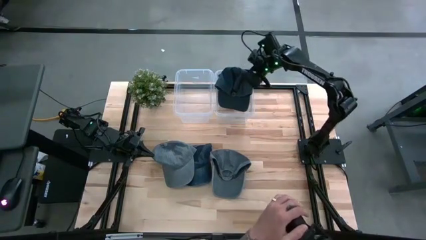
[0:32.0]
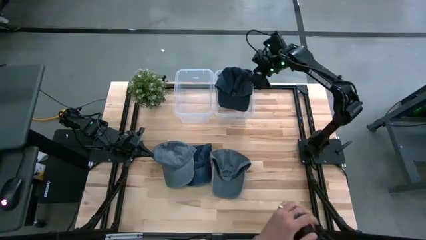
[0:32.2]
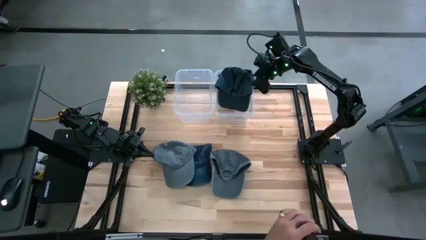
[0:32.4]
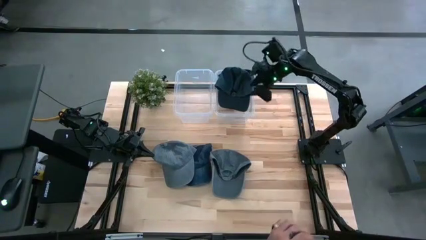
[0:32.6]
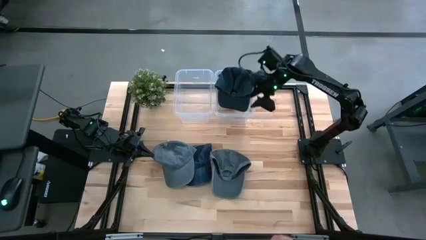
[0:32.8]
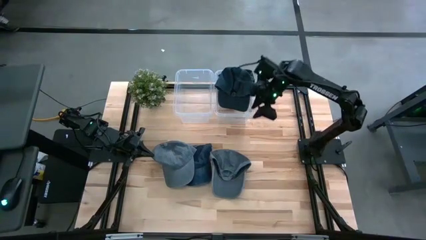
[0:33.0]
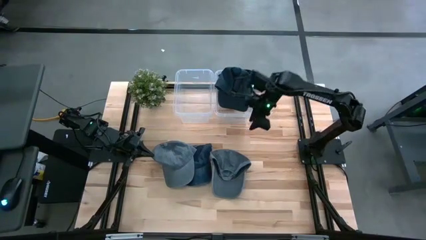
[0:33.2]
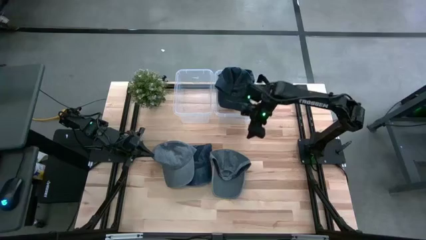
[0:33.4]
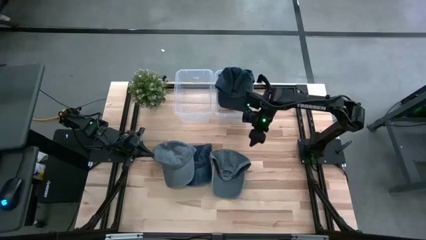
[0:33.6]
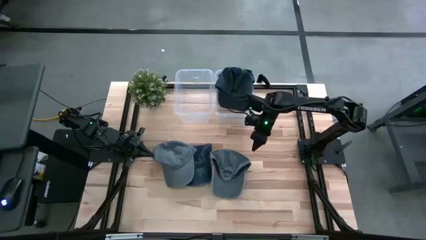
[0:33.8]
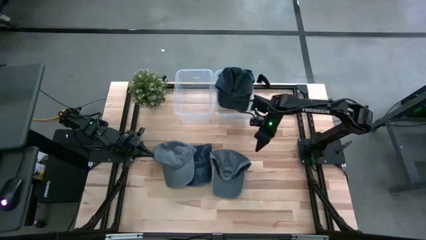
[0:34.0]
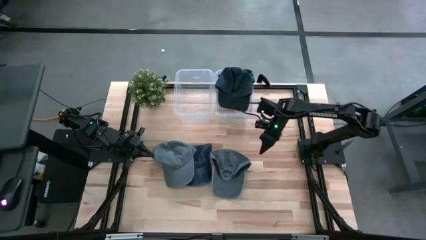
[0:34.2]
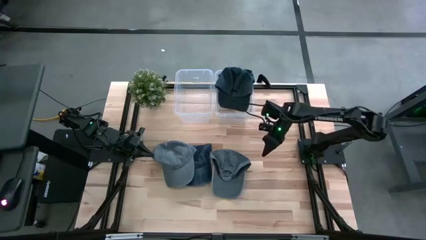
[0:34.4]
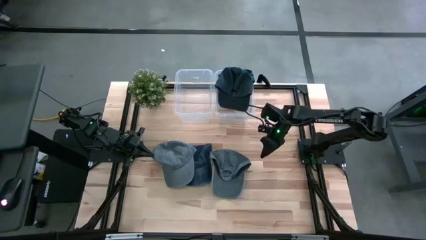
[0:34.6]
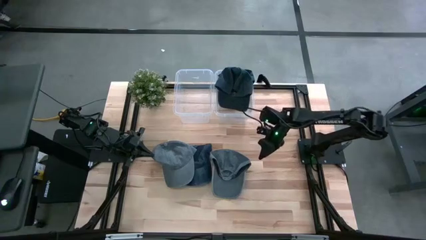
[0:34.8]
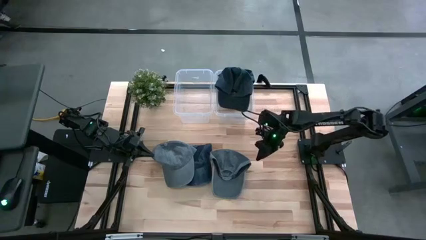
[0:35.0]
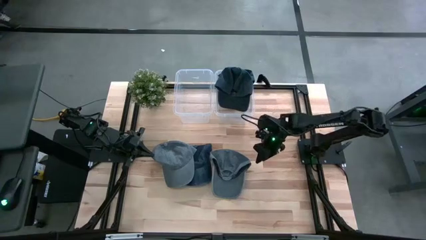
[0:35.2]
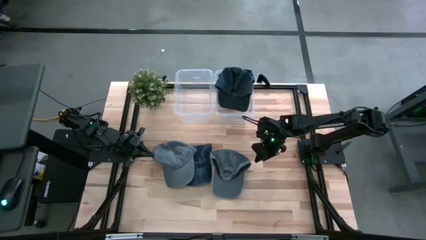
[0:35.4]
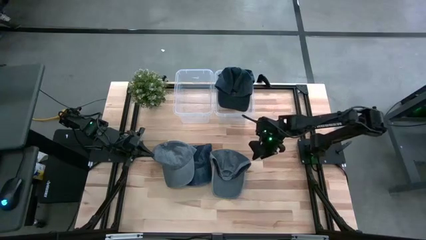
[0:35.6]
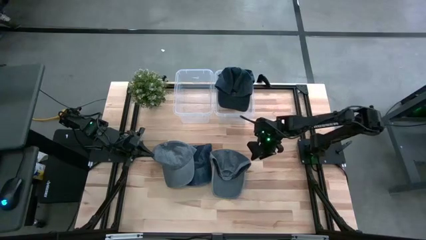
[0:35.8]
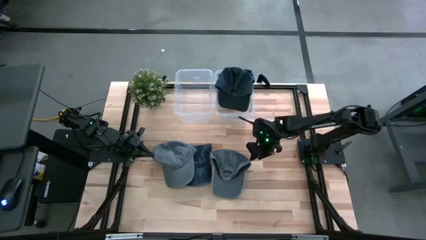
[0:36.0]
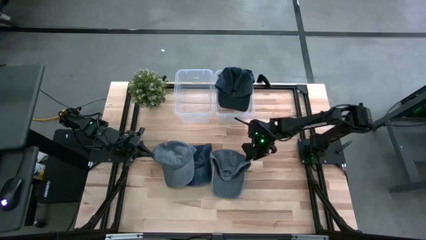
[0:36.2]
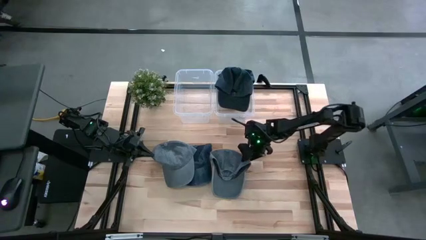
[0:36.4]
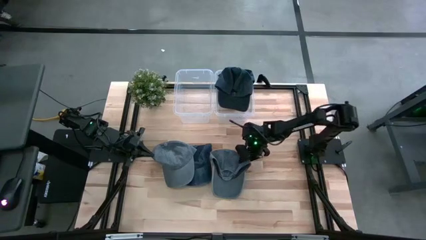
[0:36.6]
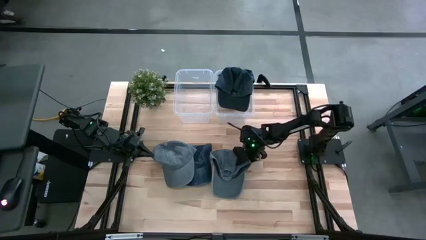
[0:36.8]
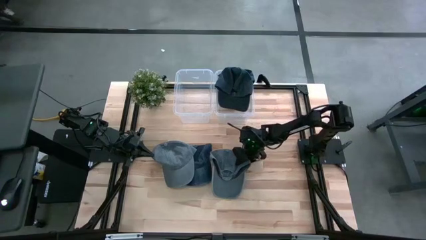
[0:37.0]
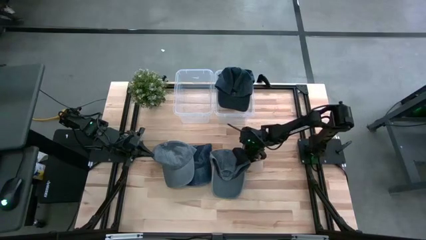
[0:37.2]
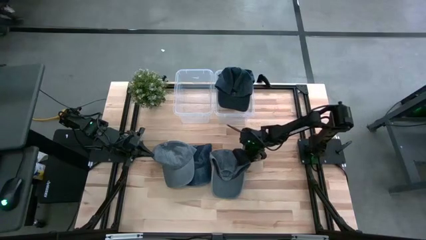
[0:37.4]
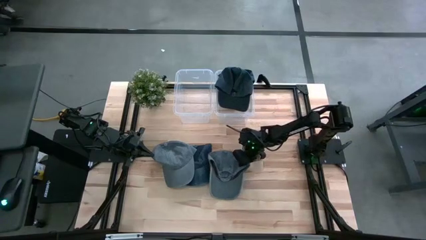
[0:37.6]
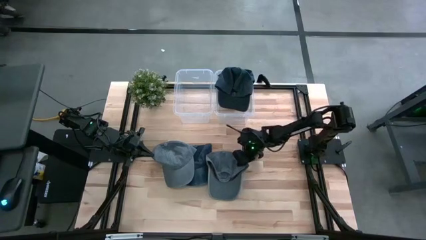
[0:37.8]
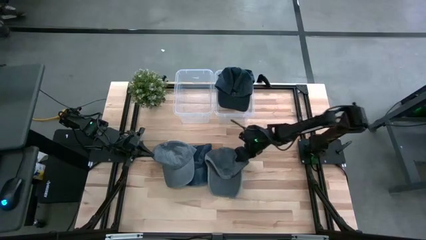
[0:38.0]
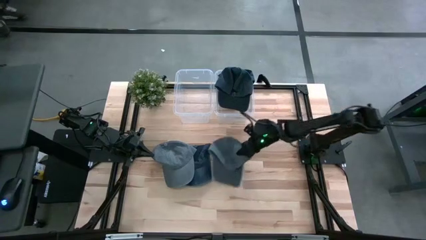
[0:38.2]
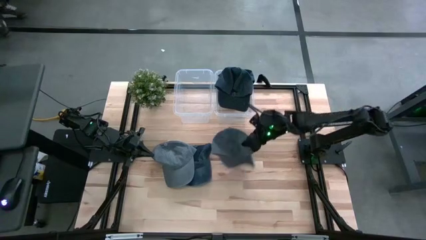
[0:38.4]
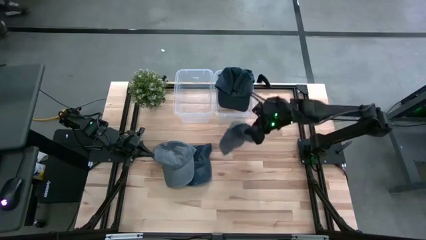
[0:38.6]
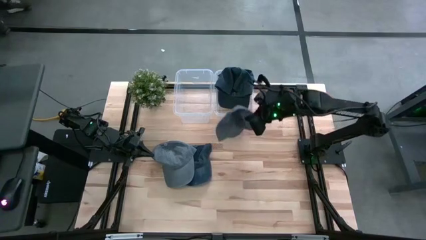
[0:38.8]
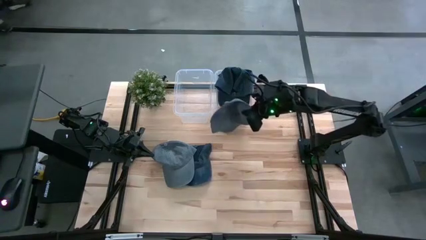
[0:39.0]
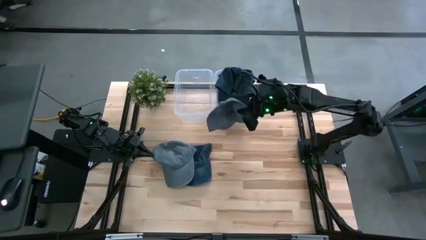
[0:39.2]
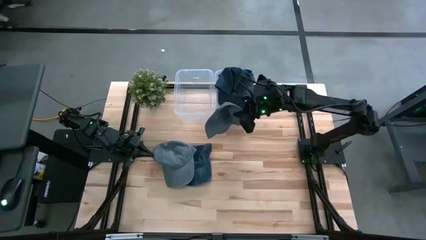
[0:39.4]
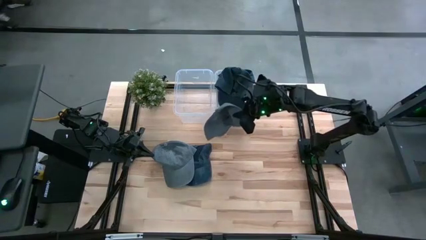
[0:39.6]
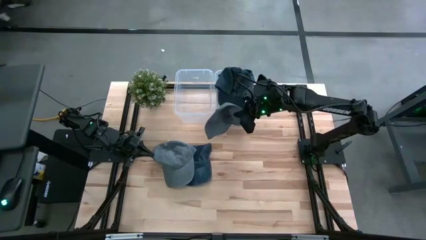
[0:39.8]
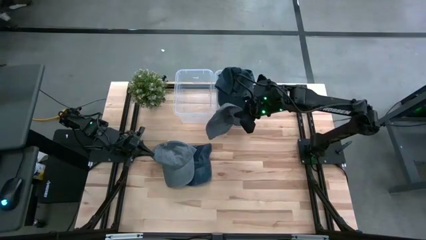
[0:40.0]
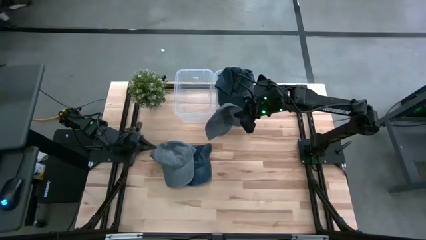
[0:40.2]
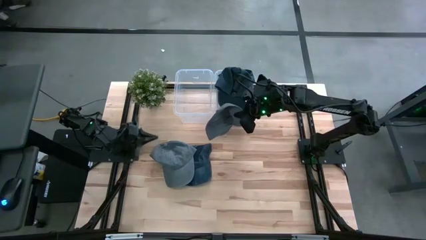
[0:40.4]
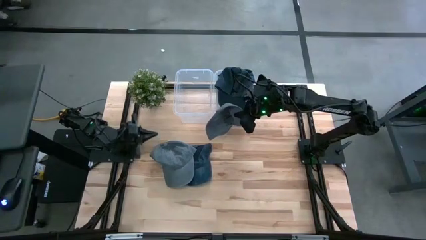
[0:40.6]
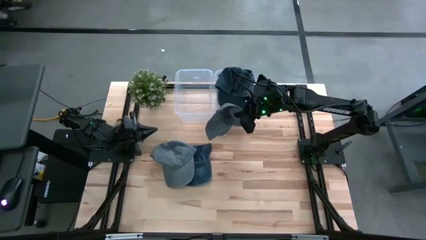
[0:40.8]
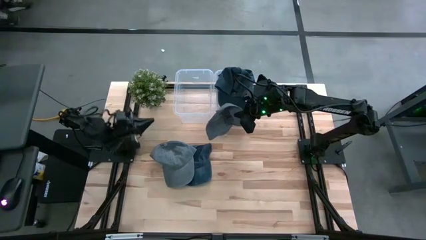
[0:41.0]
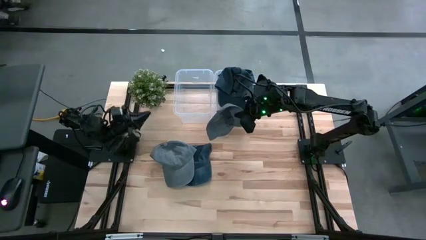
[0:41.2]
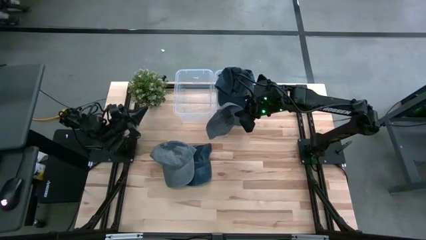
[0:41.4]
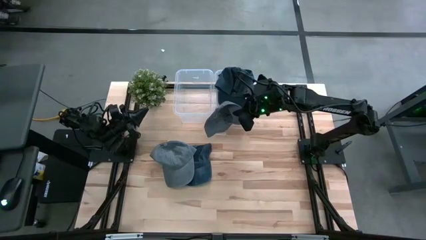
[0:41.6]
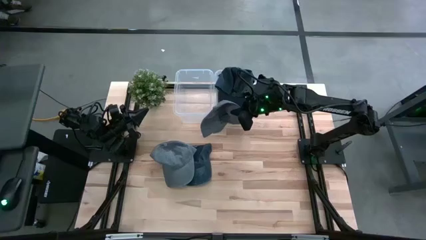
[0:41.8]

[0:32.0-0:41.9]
Task: Pick & Place hat
Put the right gray cap into the left transparent bin

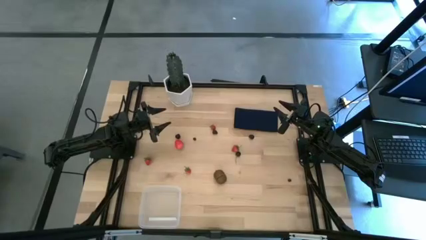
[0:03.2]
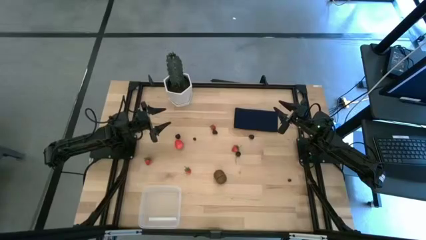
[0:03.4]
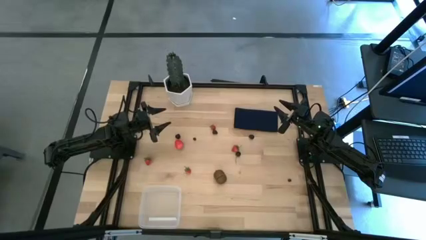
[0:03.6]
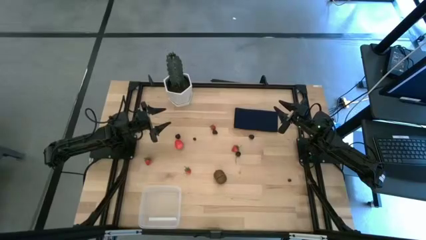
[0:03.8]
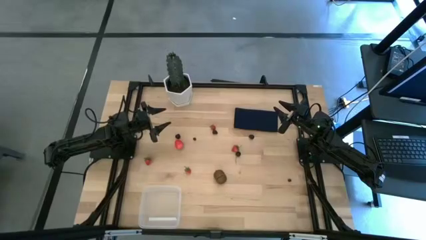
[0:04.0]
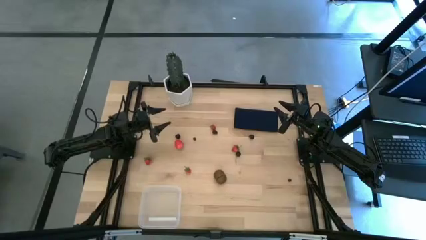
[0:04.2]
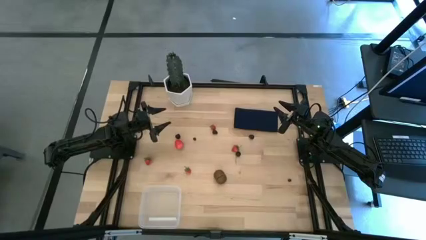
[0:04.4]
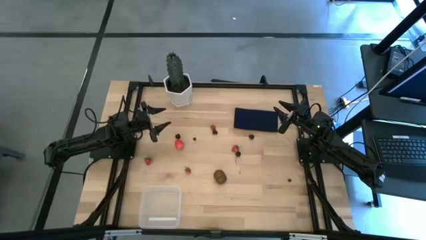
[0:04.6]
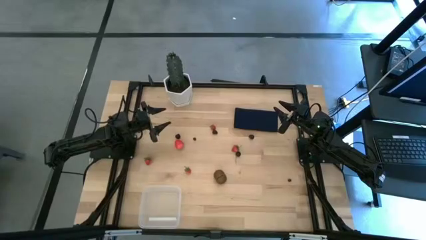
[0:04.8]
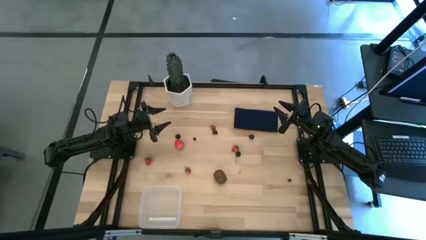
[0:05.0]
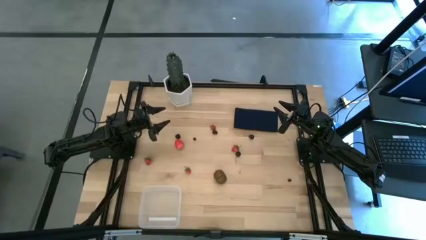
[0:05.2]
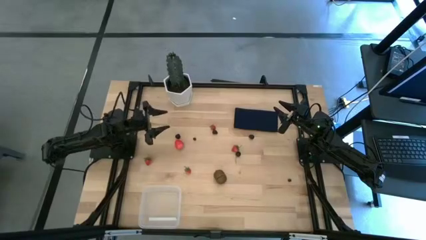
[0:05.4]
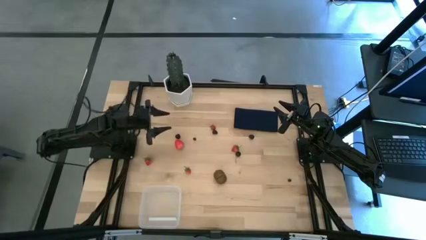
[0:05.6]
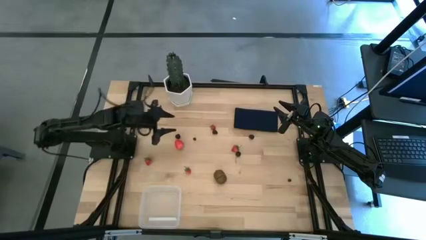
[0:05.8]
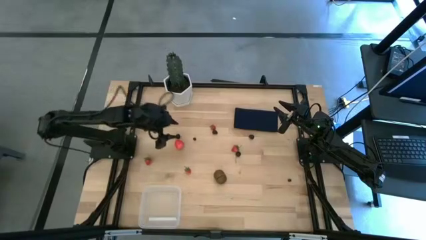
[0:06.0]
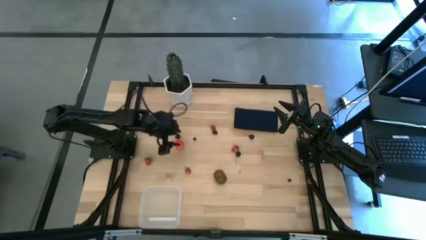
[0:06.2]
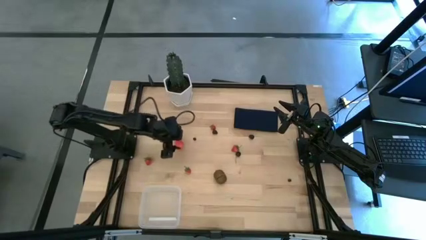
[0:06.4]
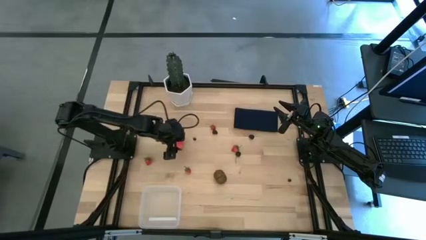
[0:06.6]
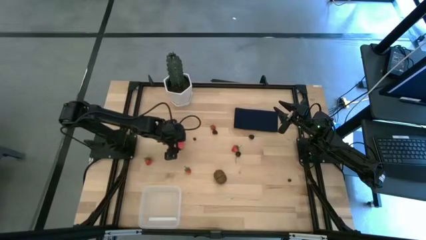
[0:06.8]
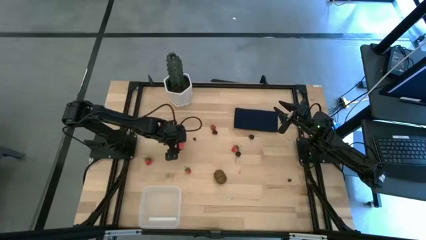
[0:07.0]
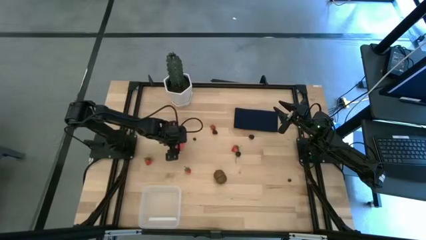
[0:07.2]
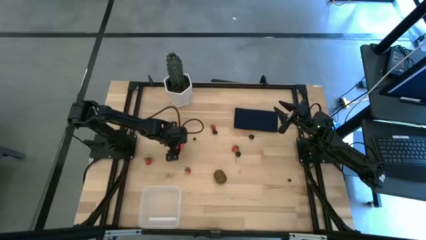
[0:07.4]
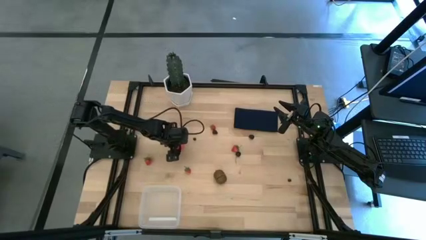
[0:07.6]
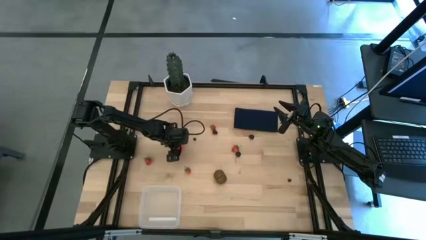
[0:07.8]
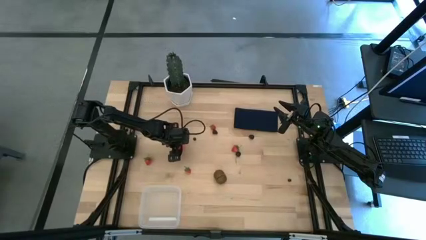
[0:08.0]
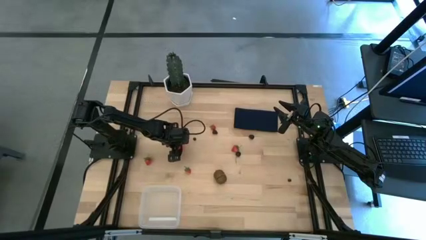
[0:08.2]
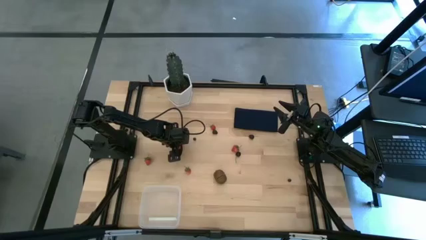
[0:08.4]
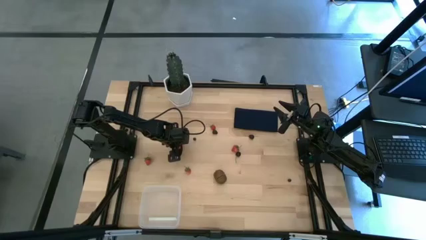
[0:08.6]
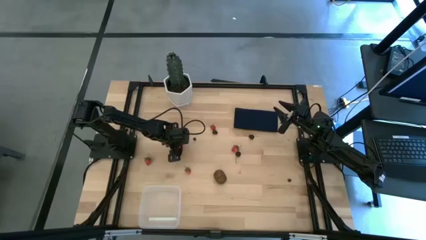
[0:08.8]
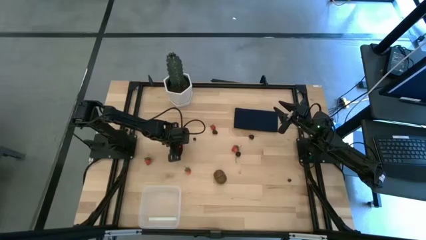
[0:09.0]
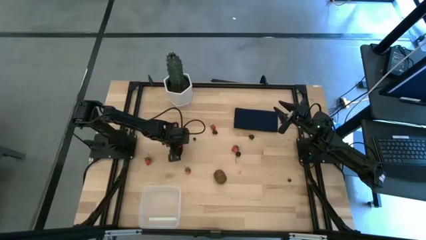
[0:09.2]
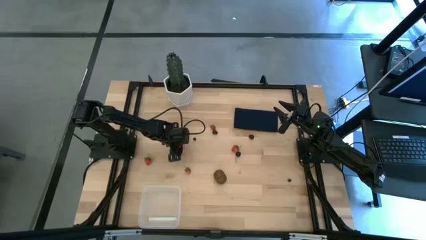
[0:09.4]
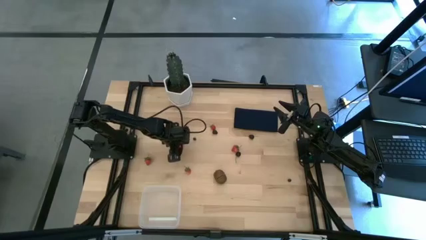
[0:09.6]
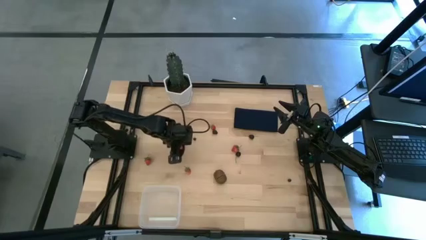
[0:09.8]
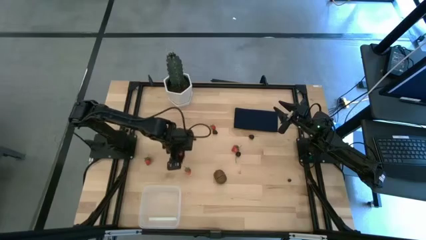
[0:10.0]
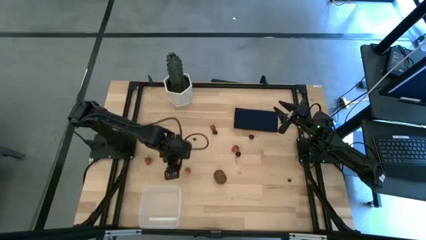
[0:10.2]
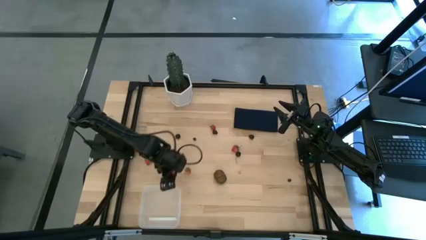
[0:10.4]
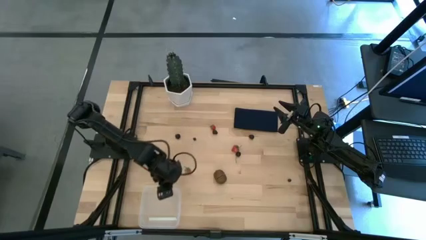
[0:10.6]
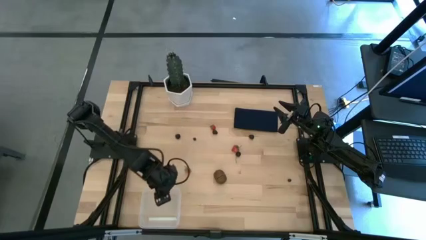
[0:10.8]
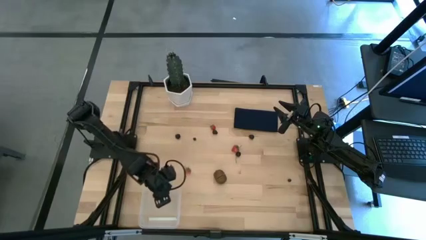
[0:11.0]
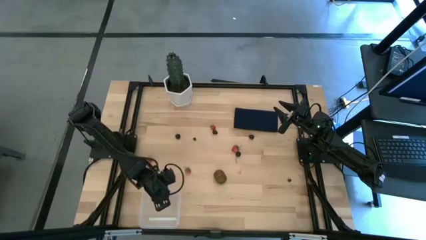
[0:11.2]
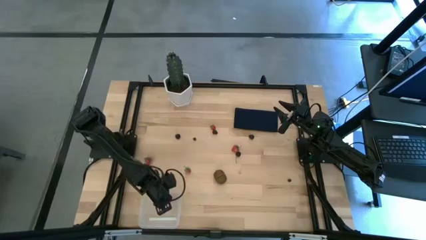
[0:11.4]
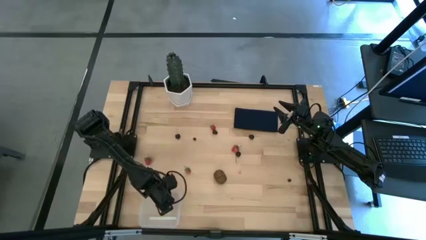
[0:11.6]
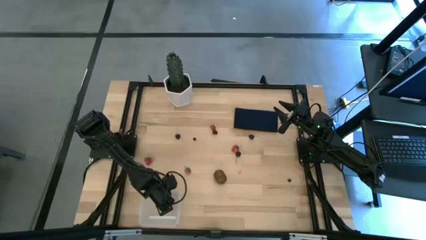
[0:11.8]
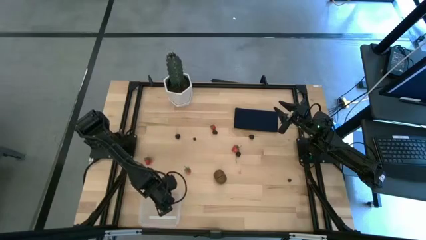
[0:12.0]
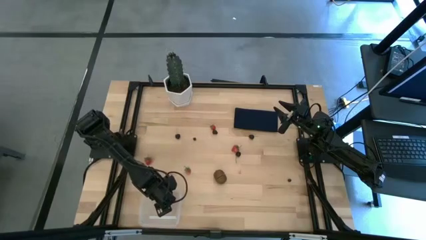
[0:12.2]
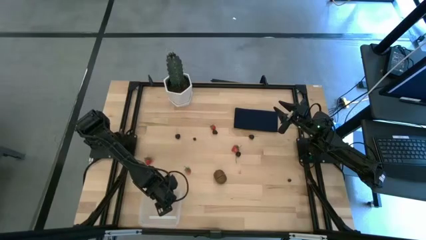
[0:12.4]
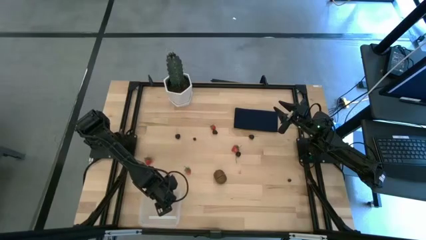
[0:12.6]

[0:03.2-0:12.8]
Task: Pick and placing Produce into tupperware
Put the strawberry in the transparent bin
